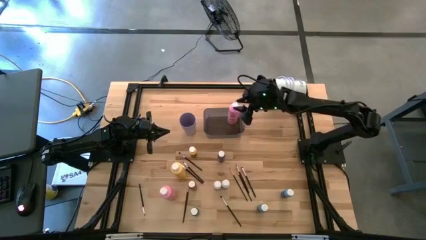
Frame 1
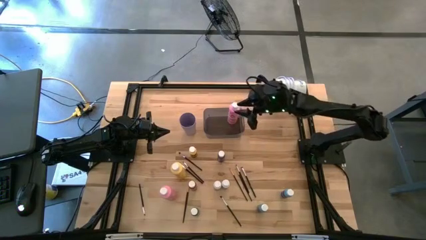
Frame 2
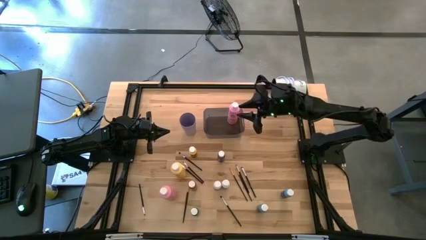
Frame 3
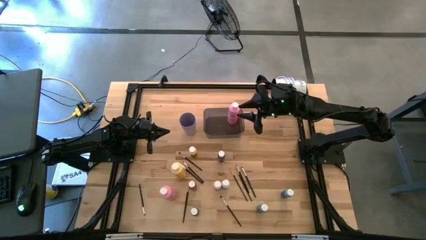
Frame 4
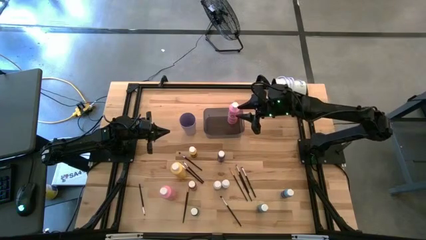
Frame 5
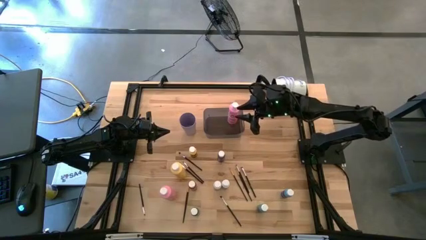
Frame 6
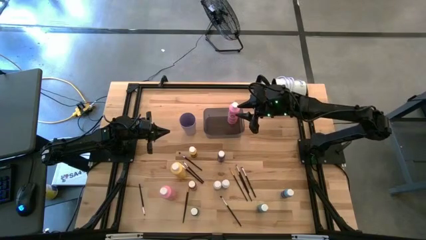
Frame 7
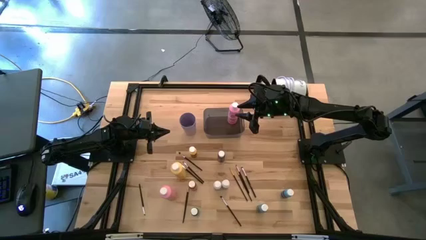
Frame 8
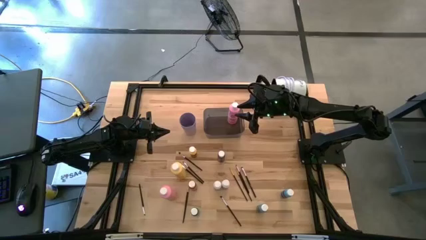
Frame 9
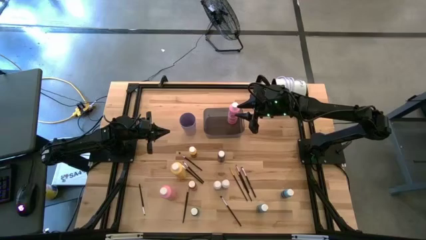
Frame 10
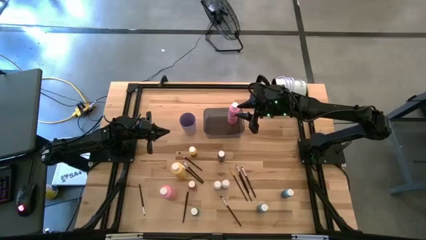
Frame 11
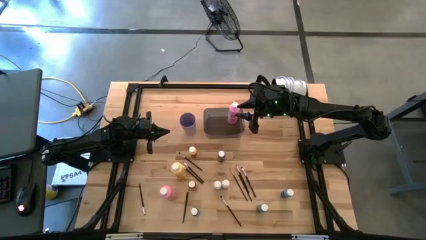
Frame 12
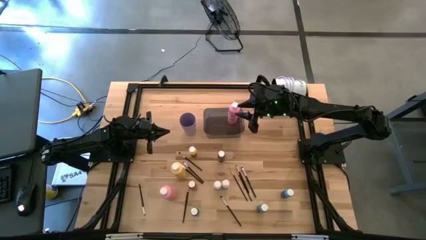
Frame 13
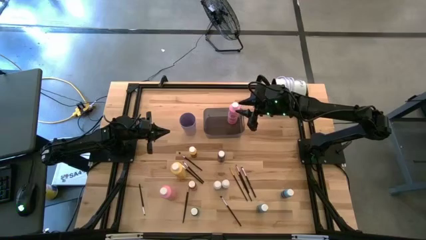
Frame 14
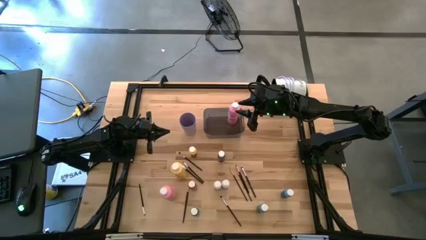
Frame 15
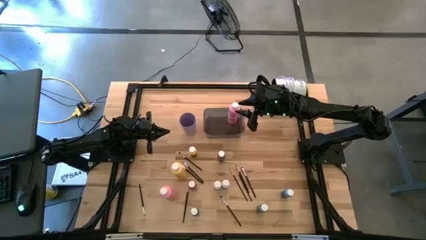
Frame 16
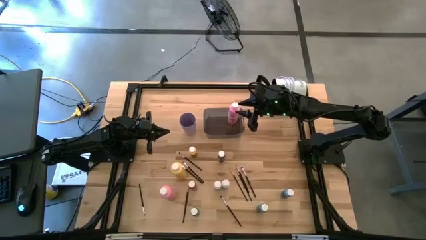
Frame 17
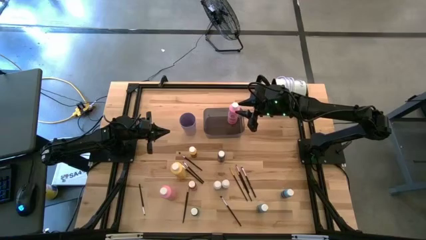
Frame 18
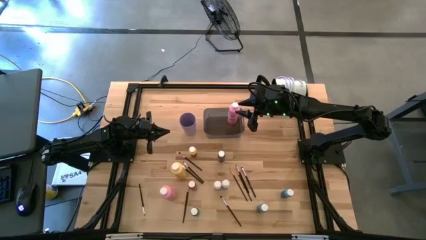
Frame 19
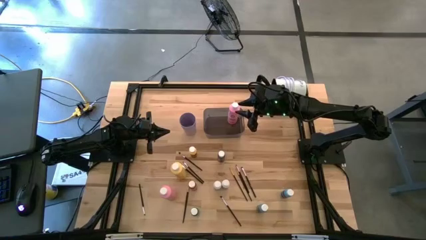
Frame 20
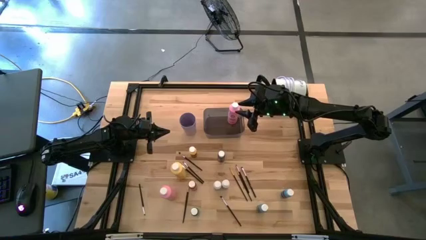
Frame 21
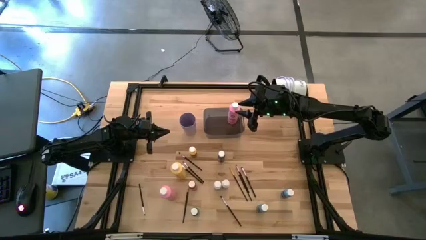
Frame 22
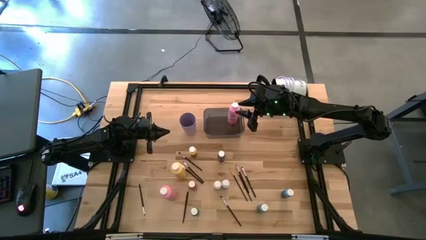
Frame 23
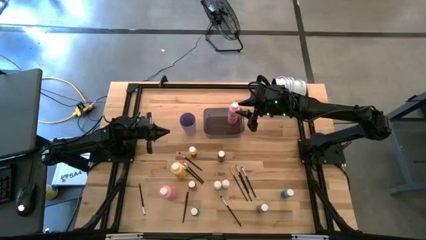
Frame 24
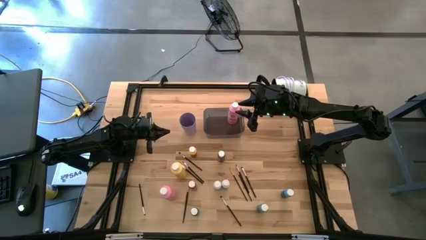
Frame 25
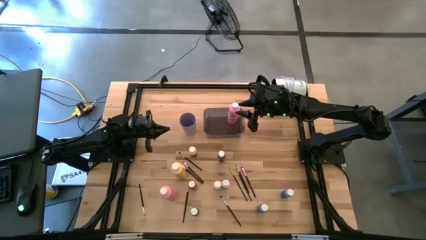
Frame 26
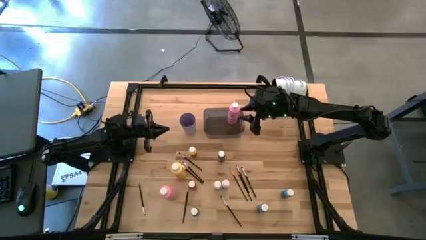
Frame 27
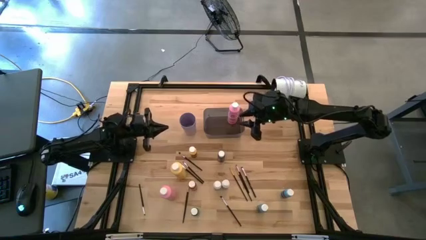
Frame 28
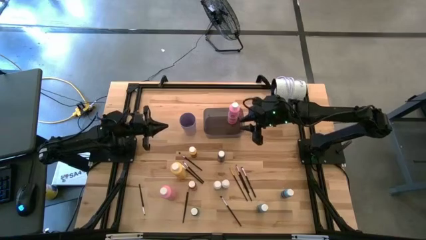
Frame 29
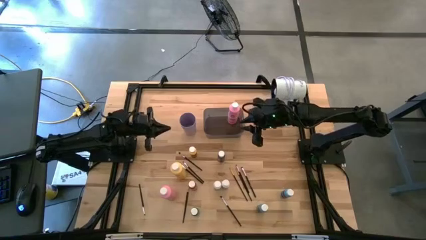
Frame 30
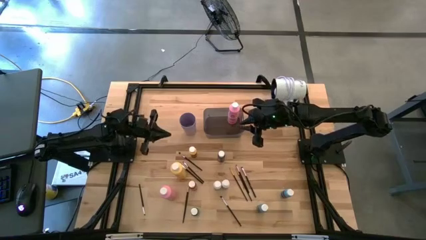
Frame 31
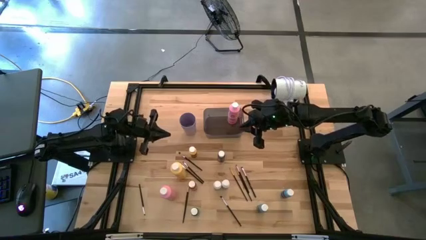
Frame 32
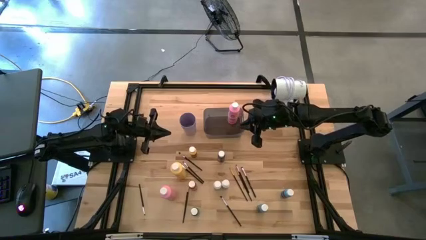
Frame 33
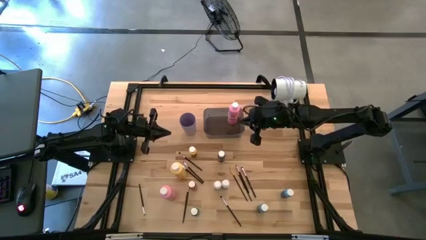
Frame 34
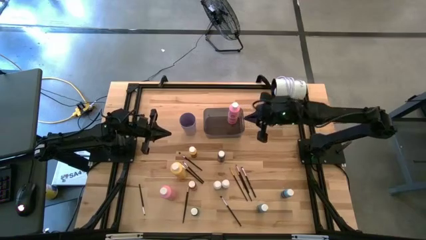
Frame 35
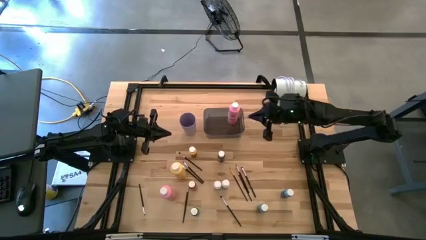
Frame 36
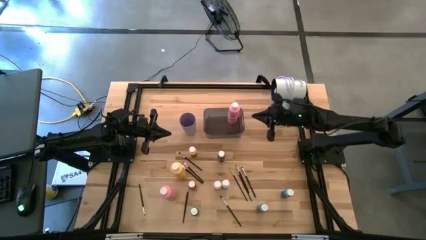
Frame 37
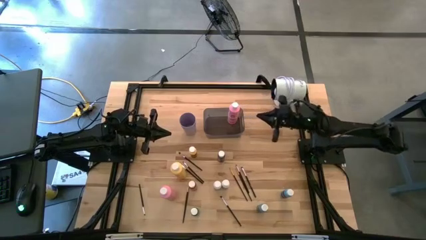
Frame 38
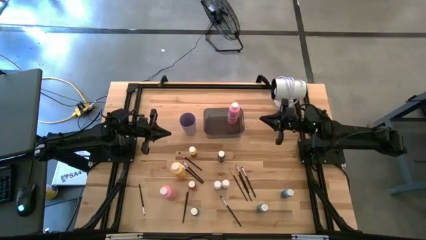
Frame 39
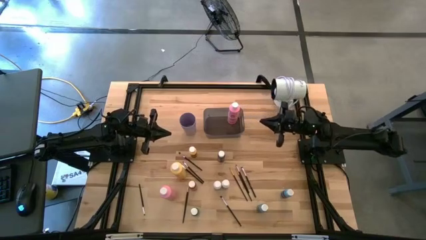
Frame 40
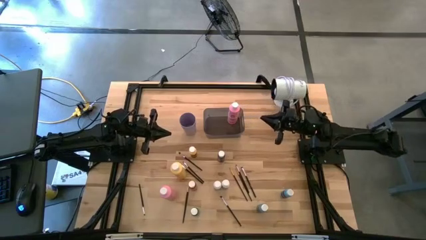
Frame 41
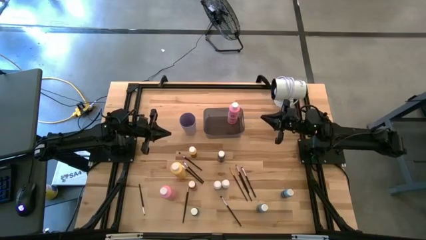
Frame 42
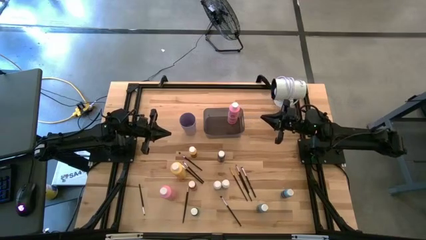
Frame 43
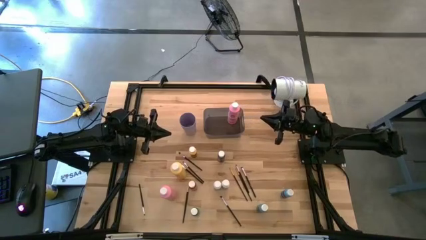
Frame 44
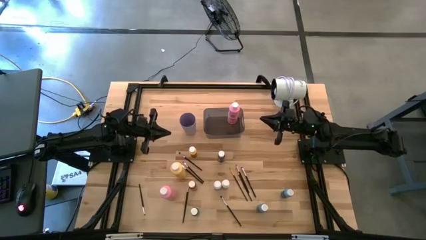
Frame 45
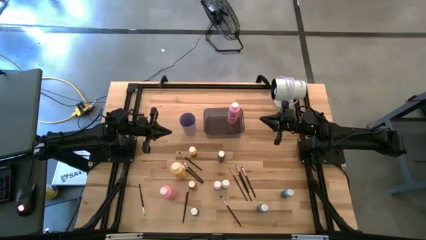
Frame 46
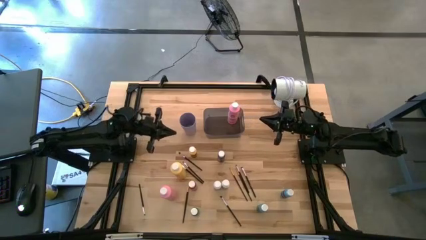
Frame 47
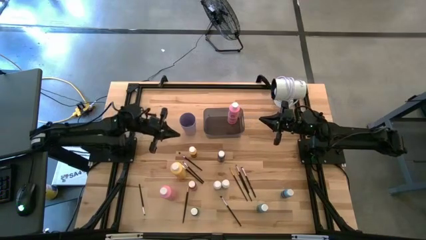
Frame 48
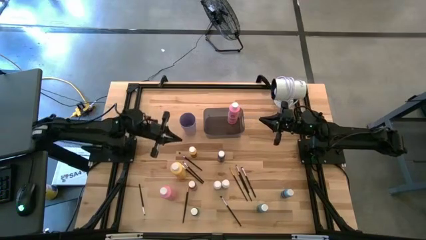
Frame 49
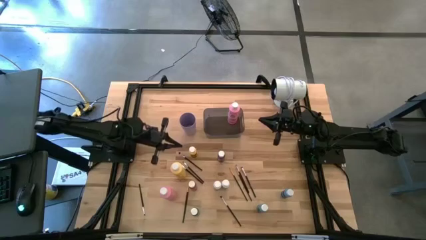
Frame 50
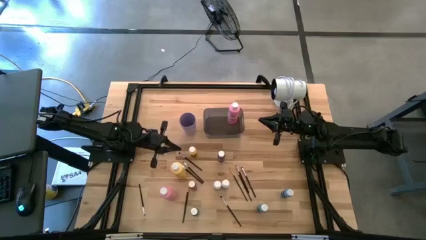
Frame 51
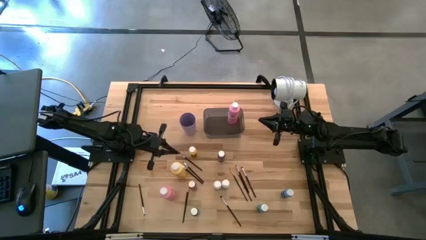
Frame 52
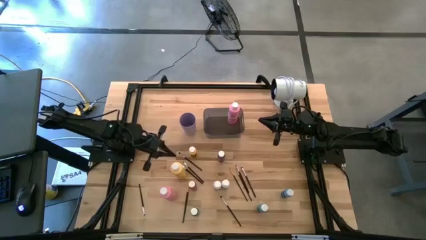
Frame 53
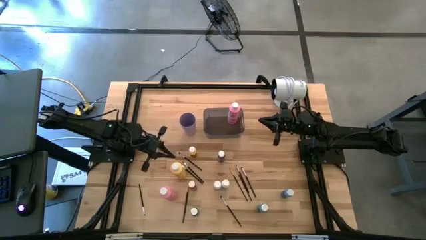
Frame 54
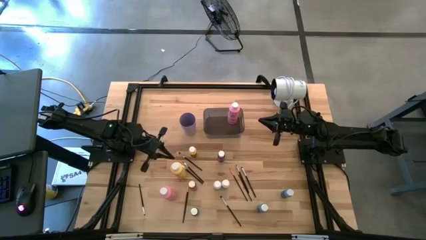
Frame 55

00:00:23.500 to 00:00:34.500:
Task: Pick & Place Paint Supplies
Put the big yellow paint bottle into the gray bin

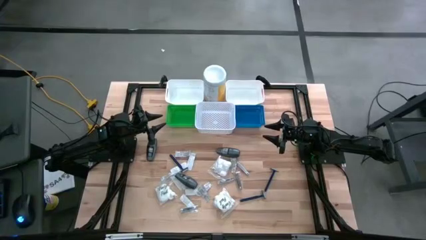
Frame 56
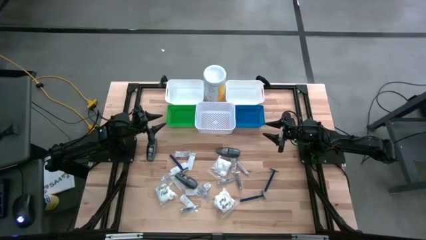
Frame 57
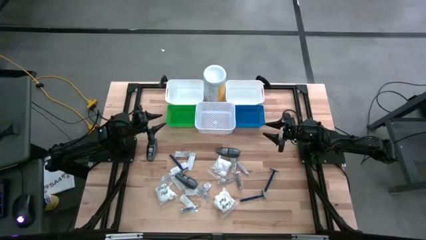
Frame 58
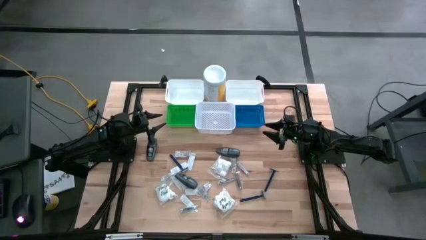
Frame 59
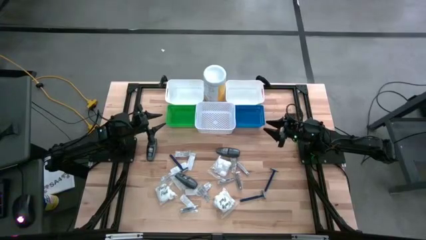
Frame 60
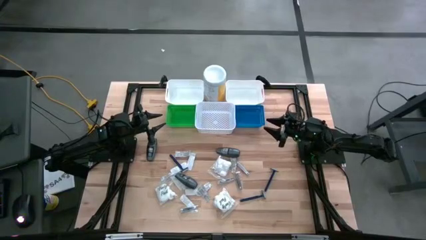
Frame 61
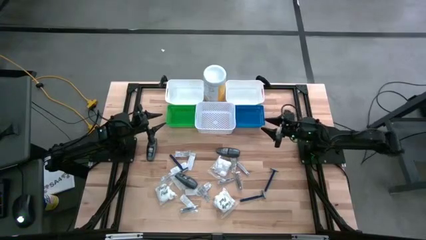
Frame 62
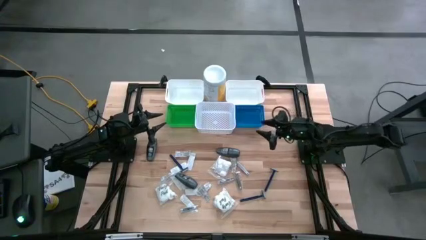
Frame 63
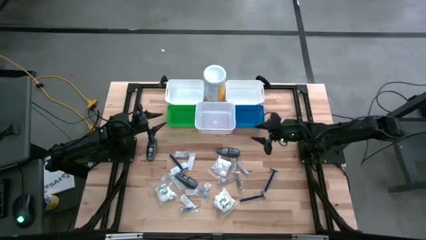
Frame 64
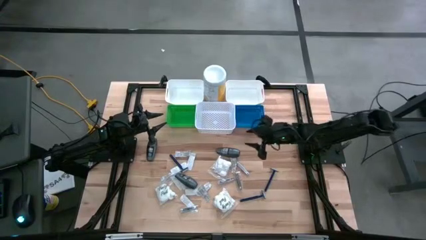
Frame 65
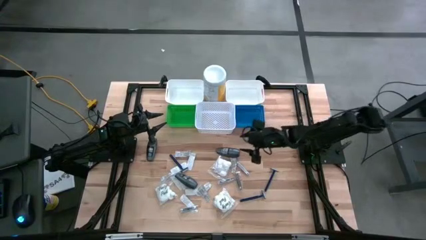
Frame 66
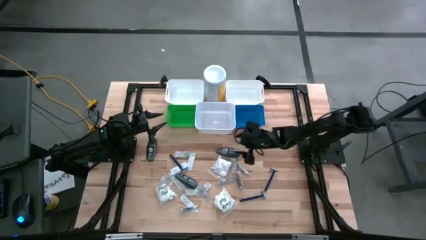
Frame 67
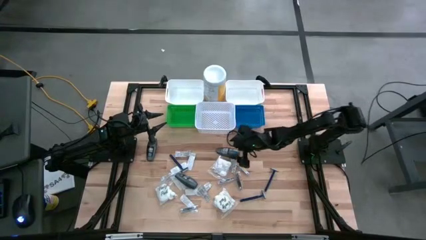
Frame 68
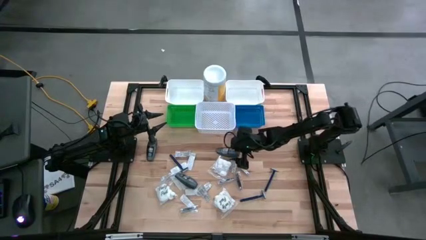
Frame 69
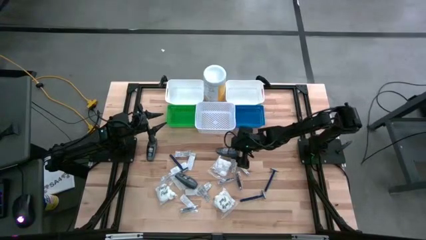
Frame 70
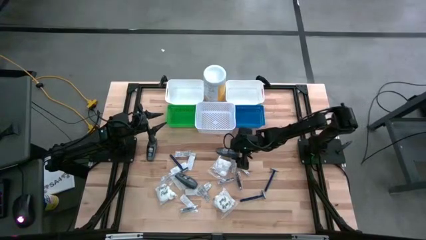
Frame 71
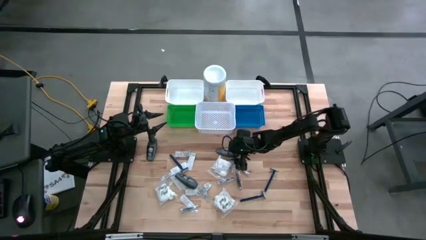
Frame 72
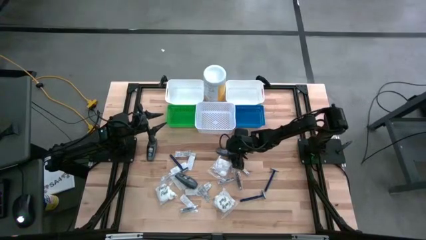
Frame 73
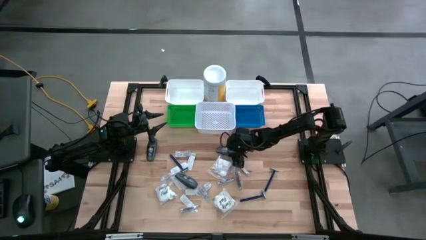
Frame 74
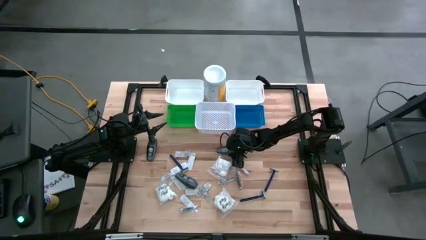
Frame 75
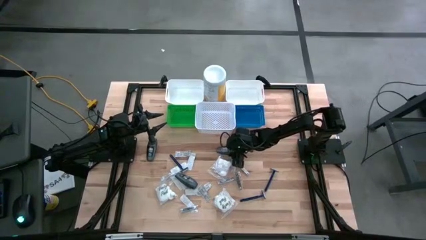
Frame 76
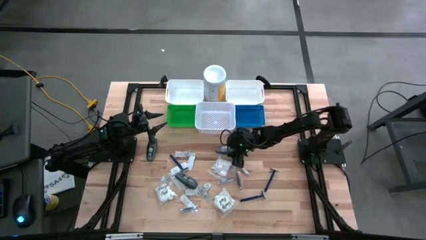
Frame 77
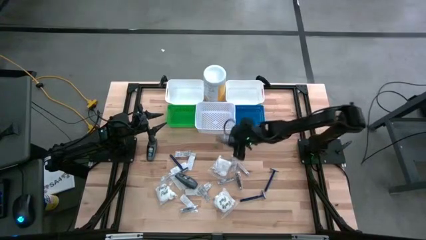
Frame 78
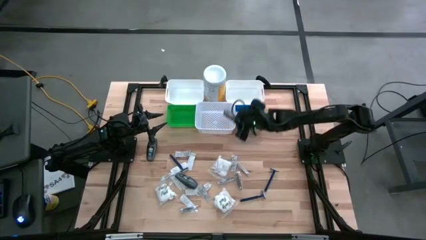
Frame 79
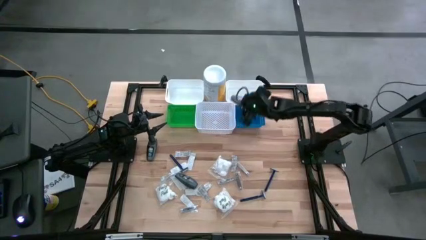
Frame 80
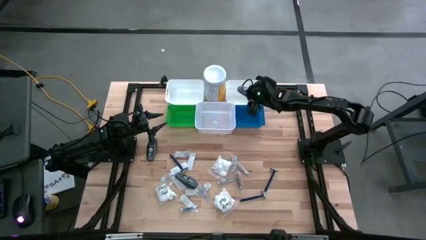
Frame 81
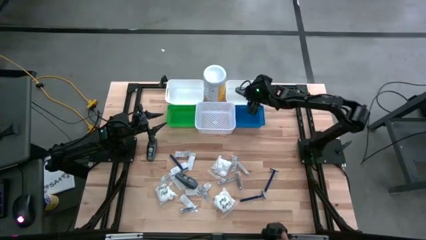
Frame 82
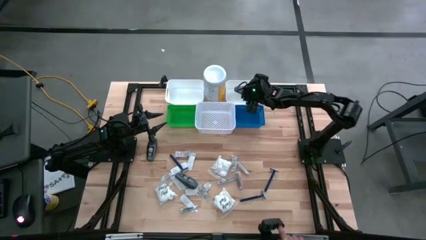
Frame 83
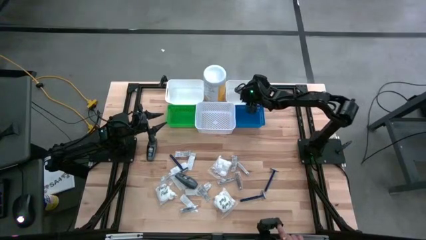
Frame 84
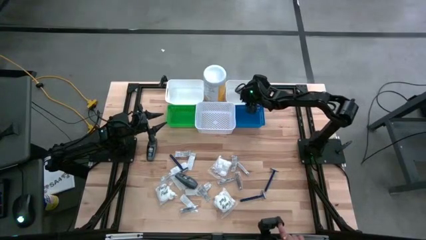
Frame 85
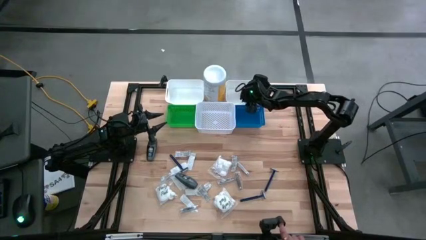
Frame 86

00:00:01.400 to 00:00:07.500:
Task: Pick & Place Travel size toiletries
Put the black deodorant into the top right white bin
